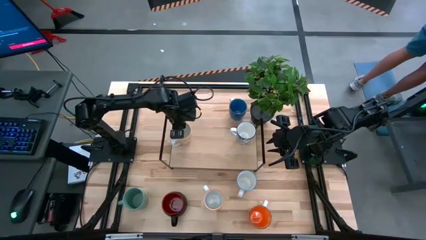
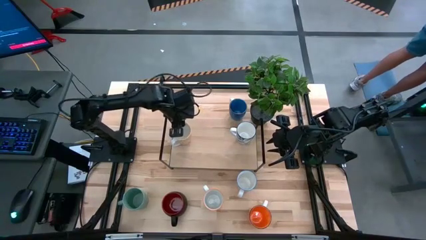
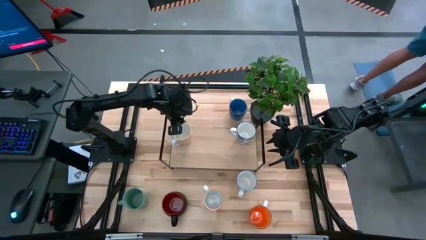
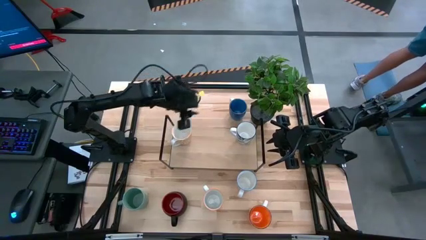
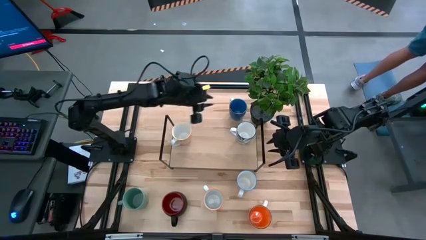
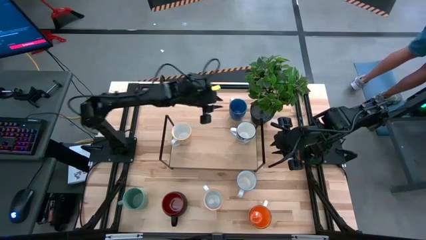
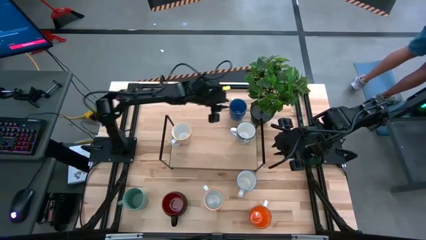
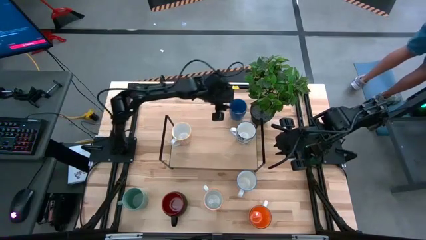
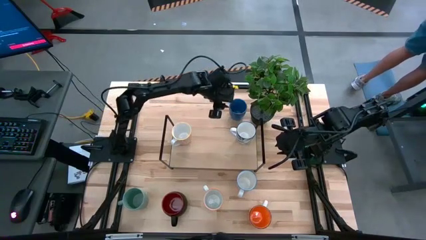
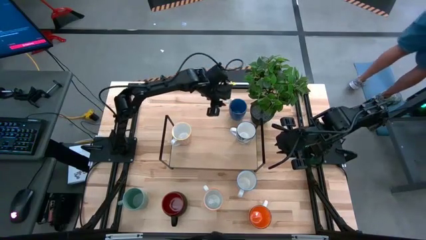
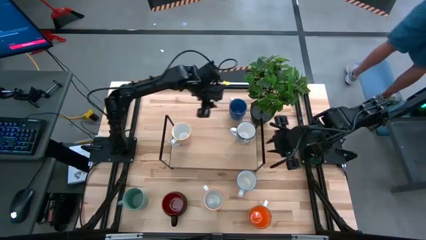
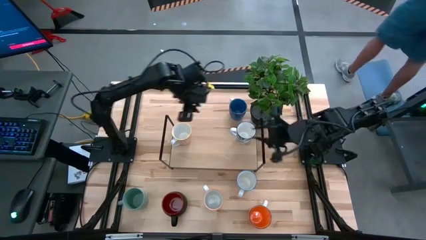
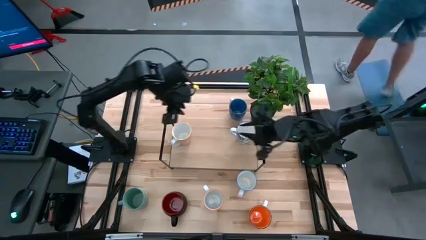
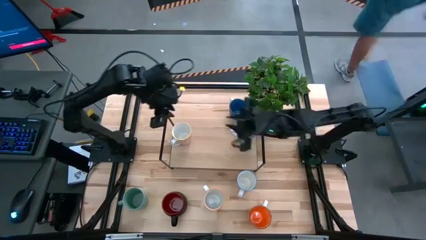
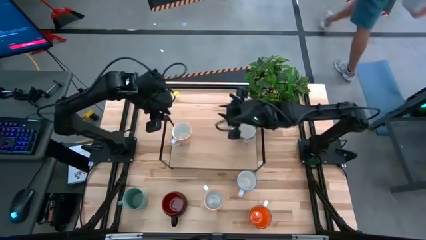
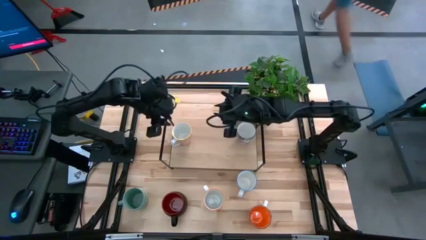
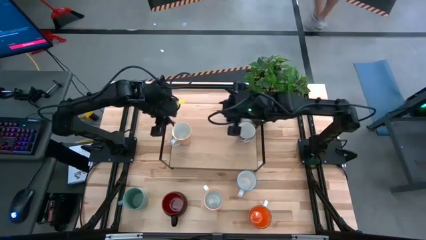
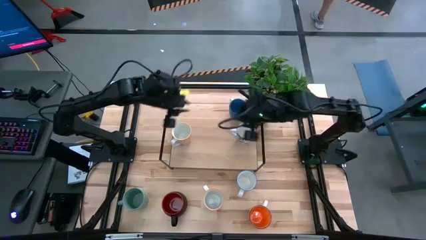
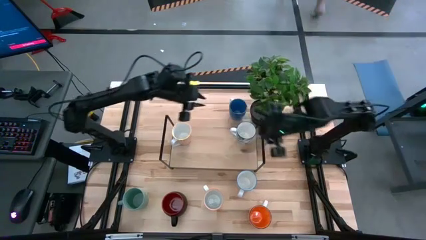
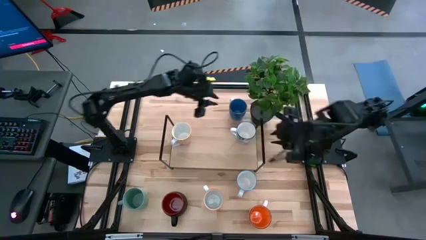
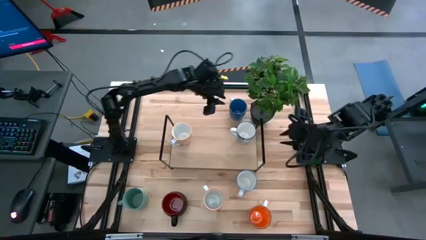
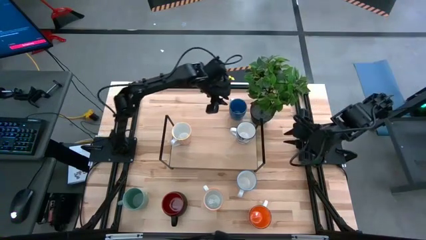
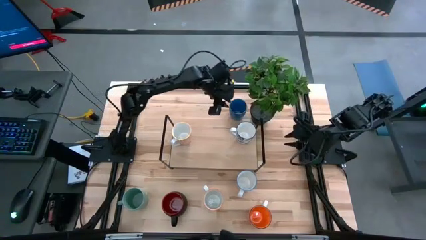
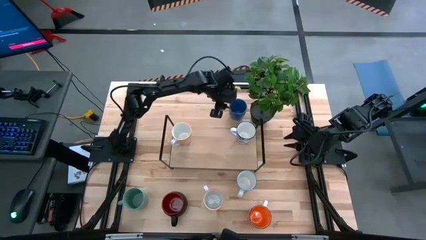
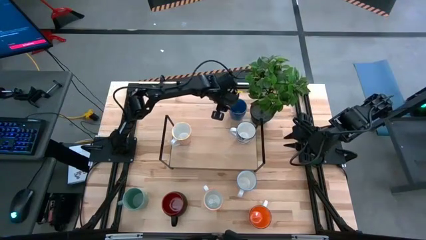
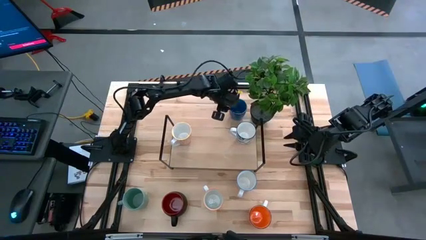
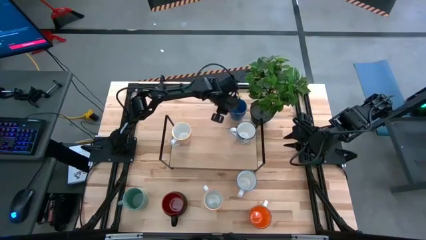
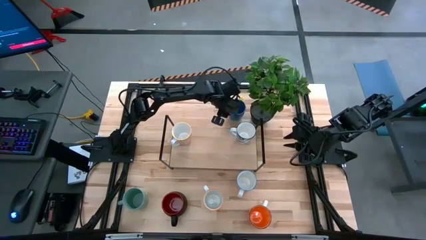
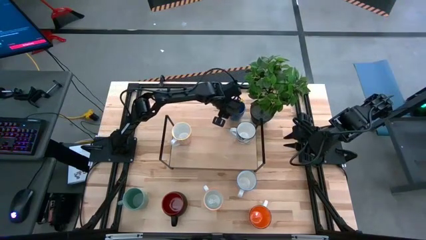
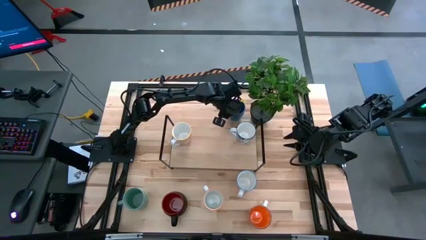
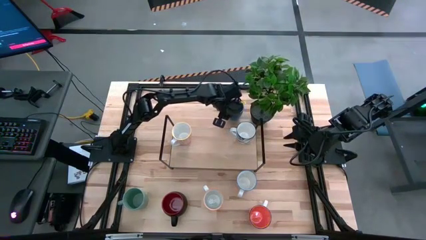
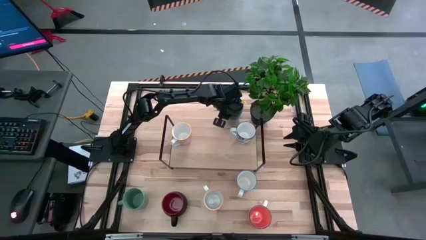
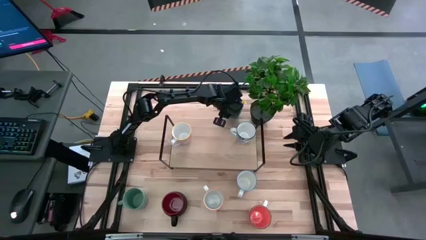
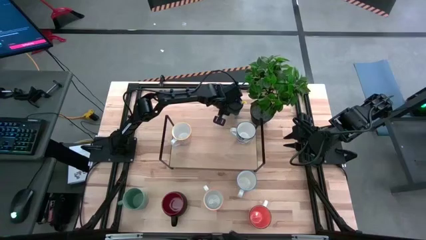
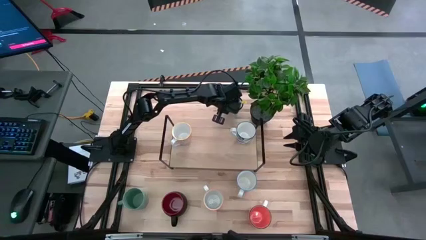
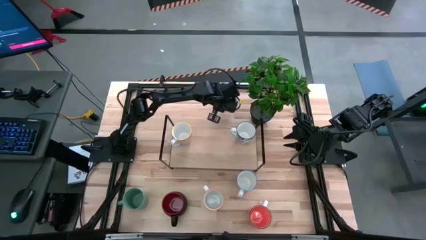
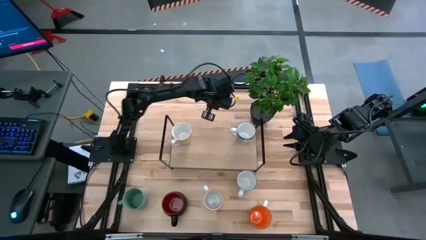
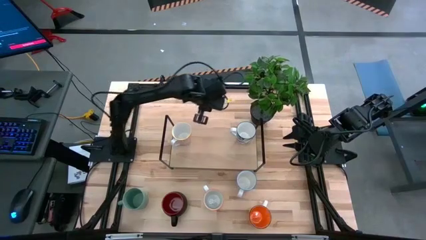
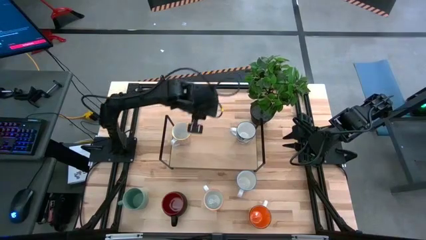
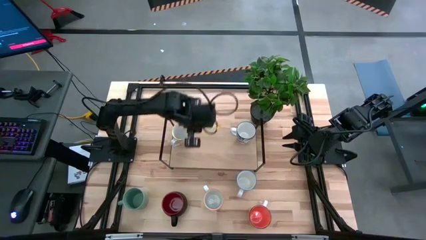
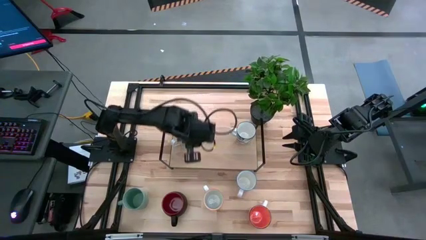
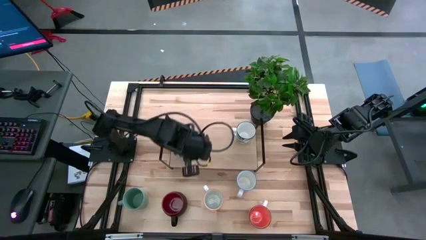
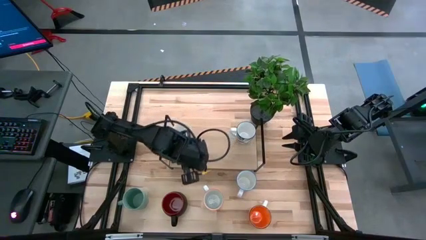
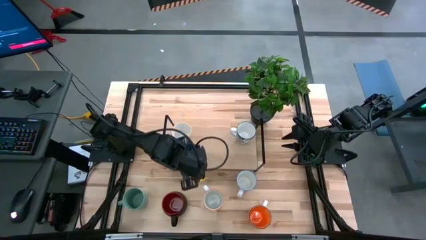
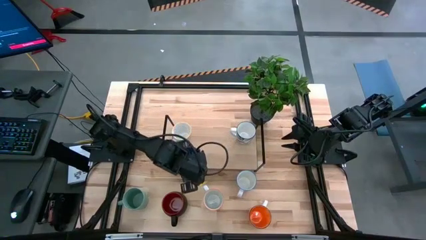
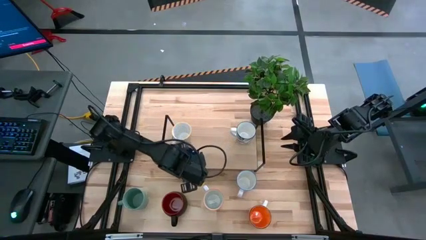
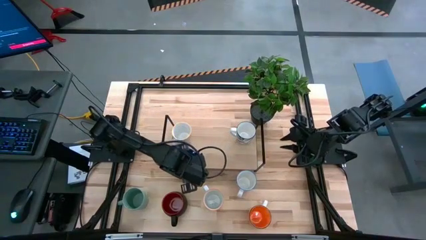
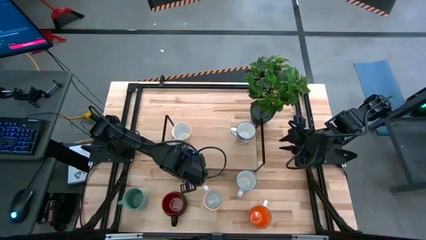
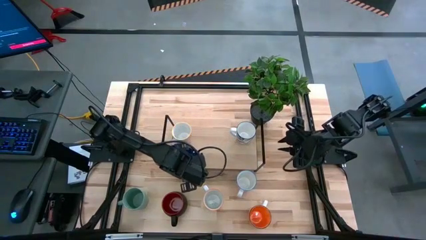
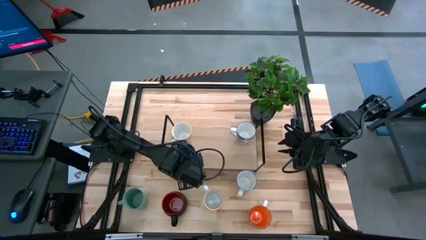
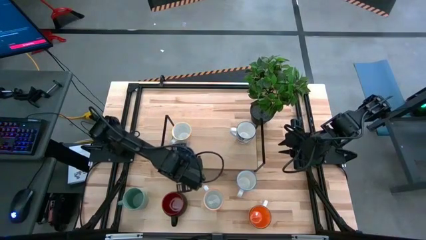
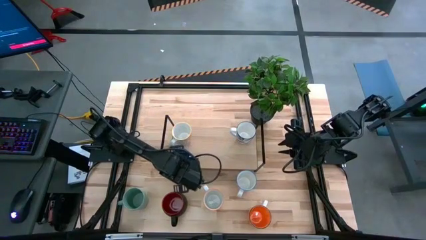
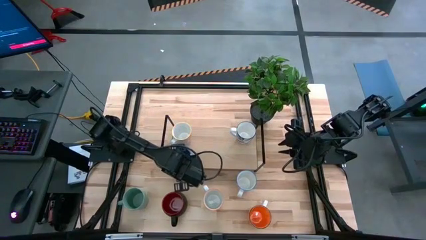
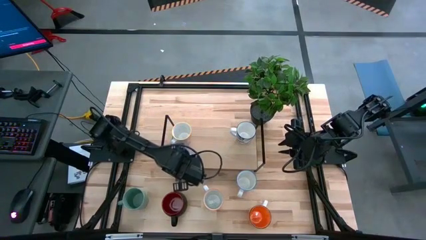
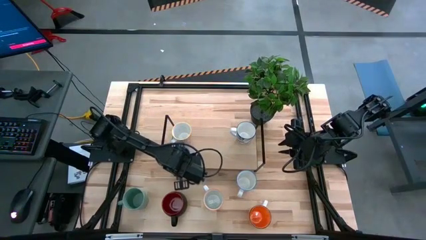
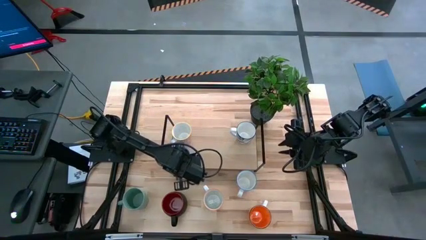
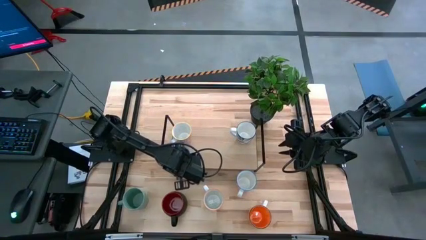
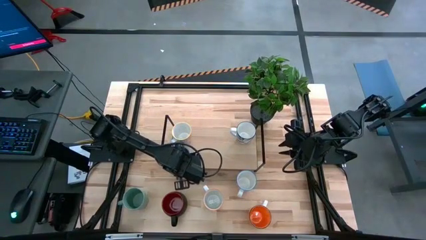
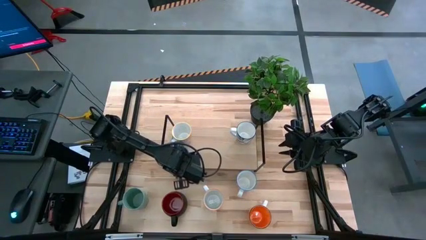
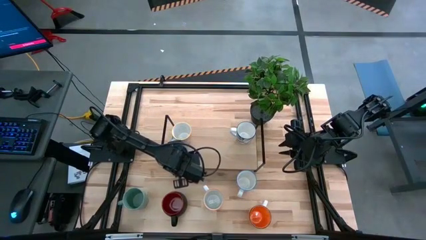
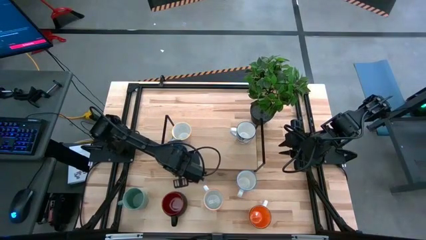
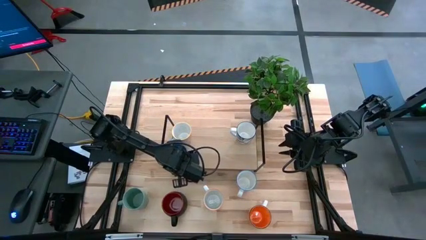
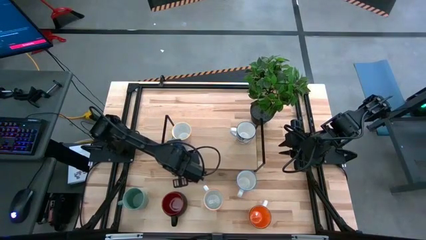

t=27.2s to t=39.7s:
Task: Place coffee mugs
Put the blue mug on the shelf
